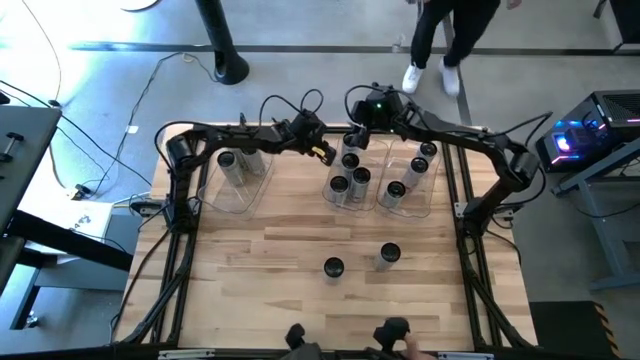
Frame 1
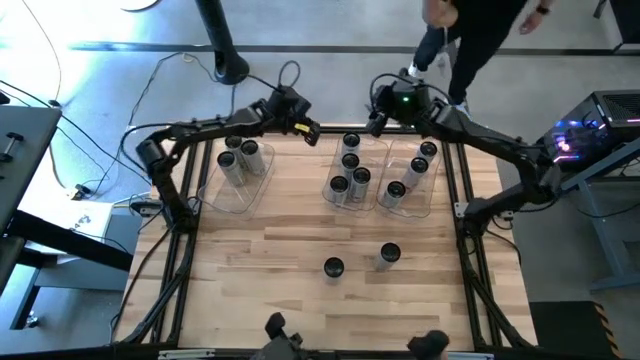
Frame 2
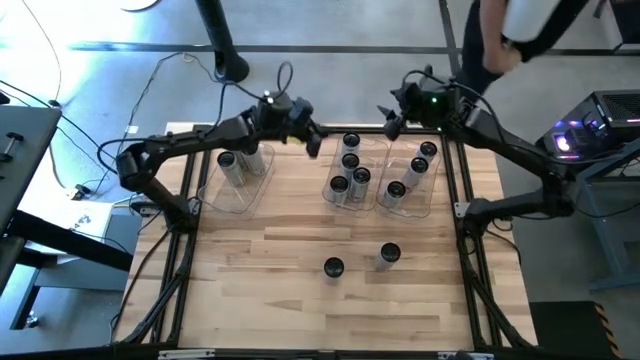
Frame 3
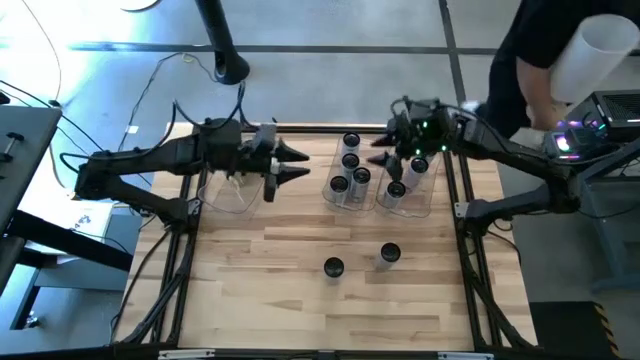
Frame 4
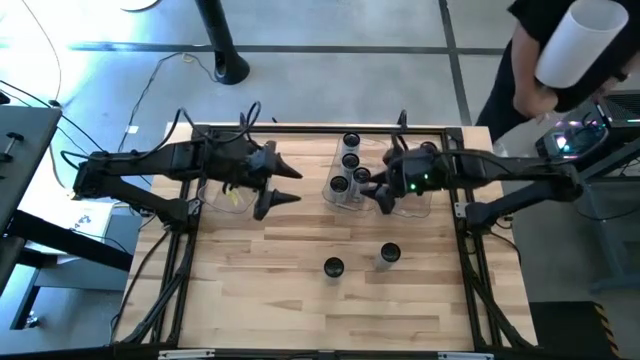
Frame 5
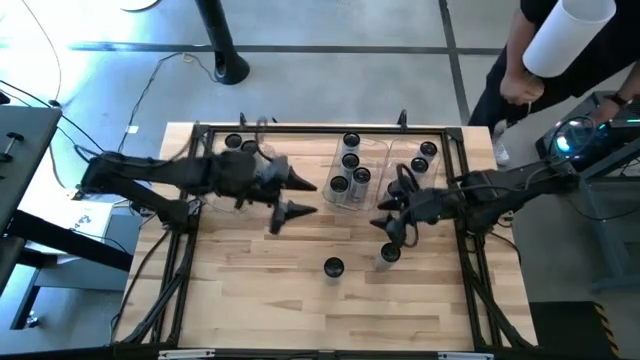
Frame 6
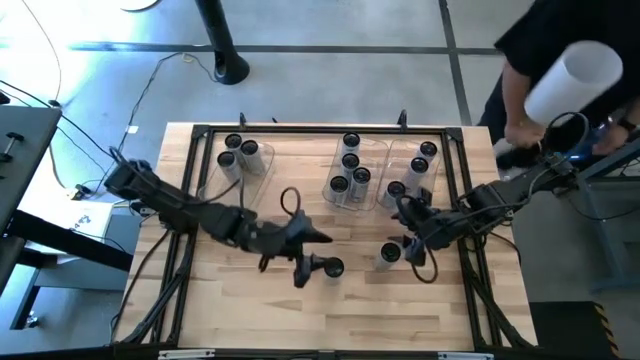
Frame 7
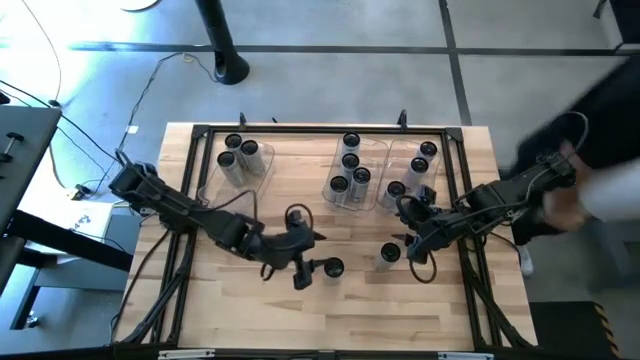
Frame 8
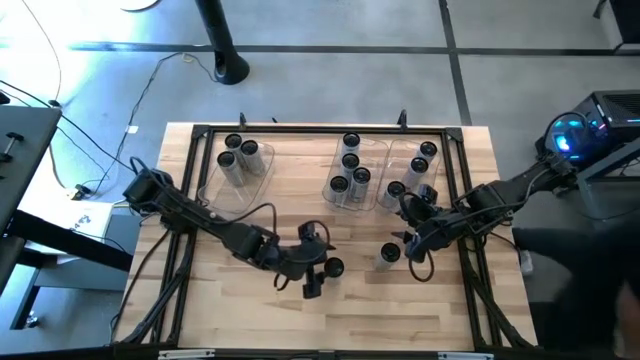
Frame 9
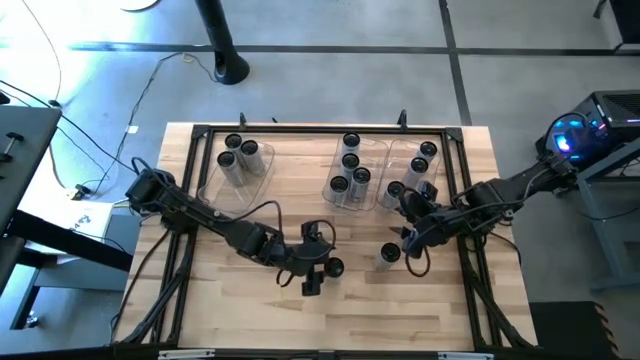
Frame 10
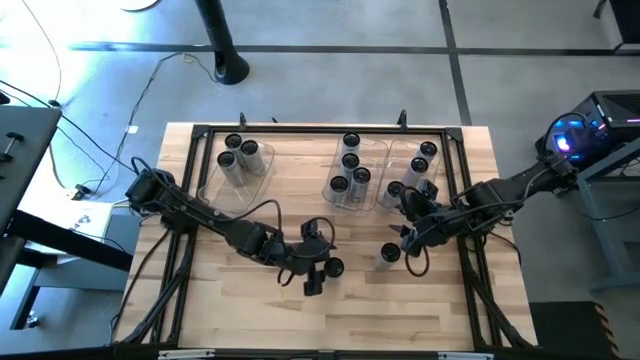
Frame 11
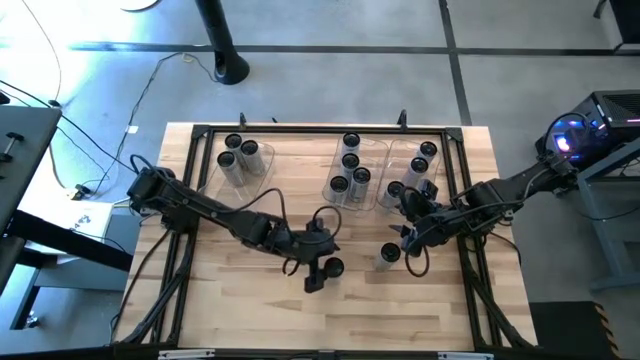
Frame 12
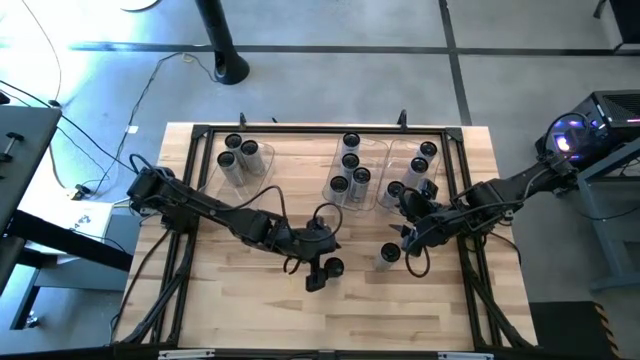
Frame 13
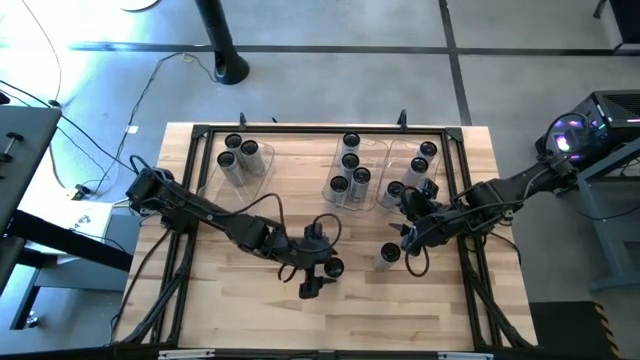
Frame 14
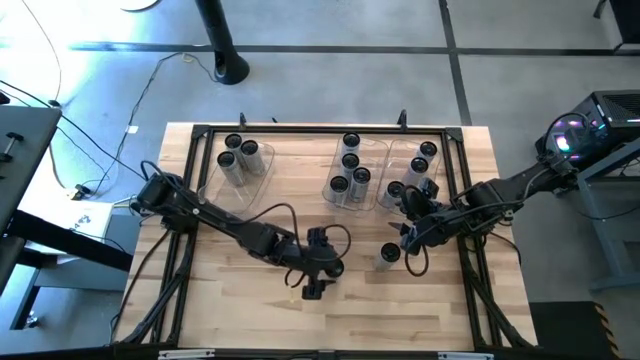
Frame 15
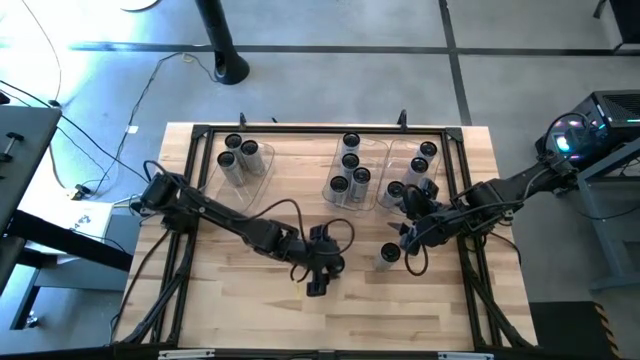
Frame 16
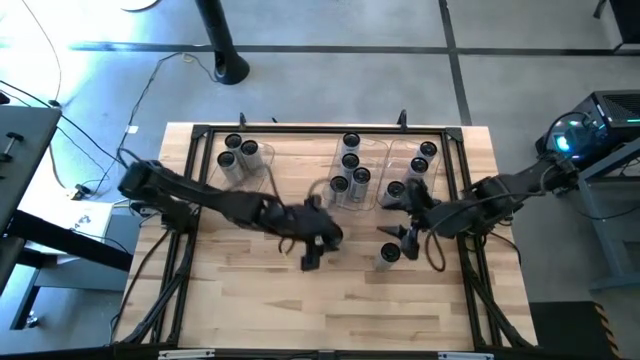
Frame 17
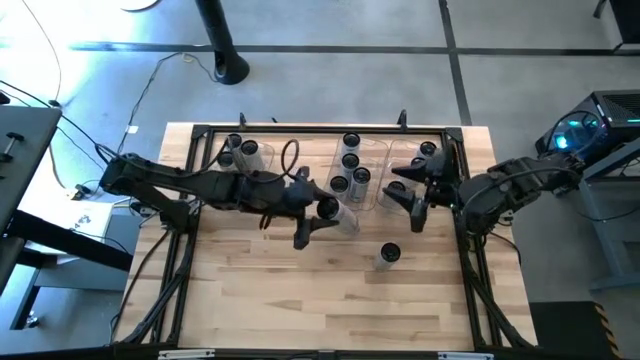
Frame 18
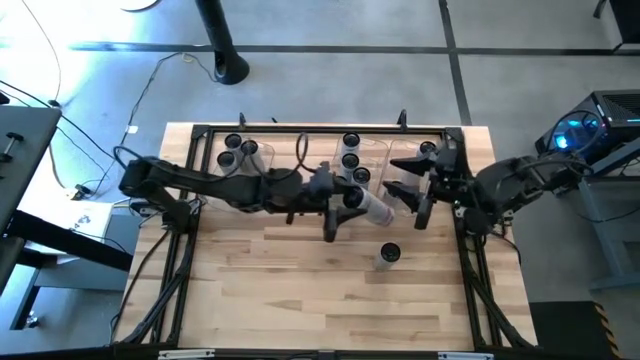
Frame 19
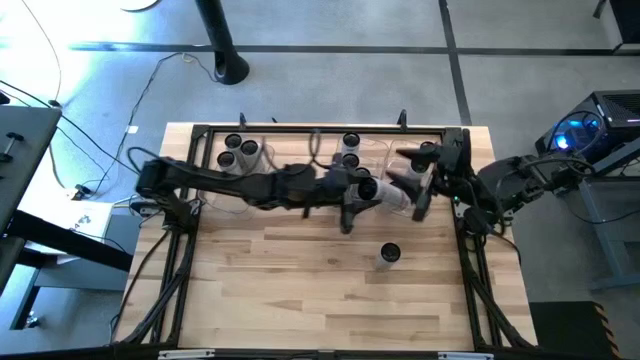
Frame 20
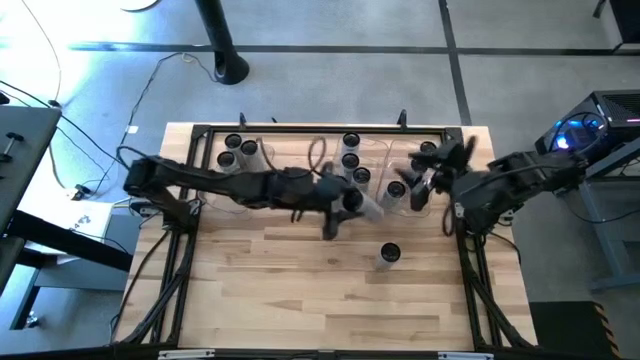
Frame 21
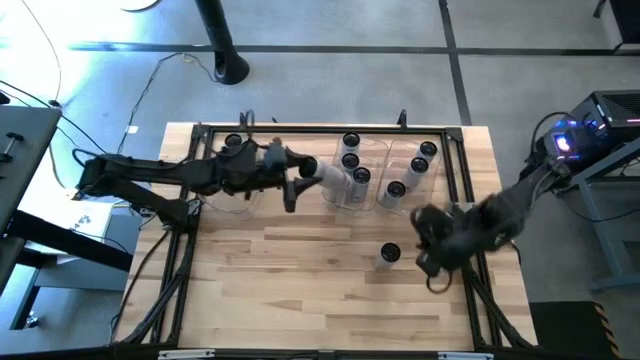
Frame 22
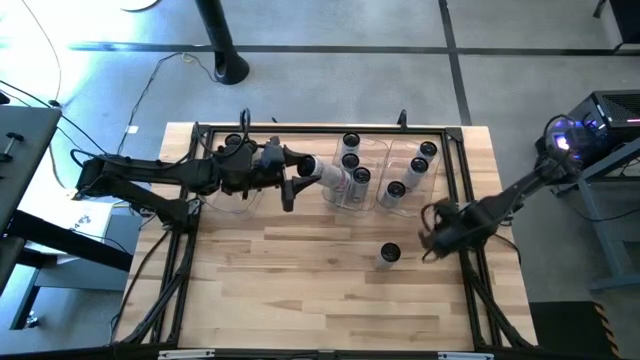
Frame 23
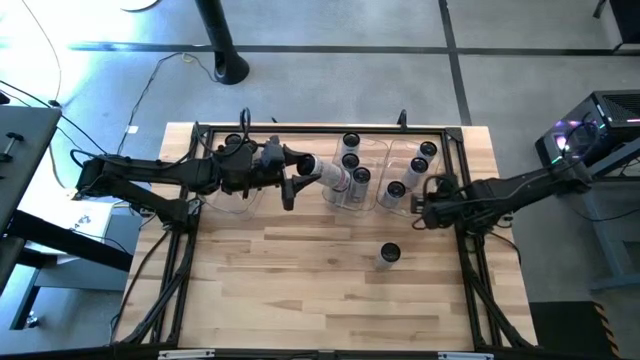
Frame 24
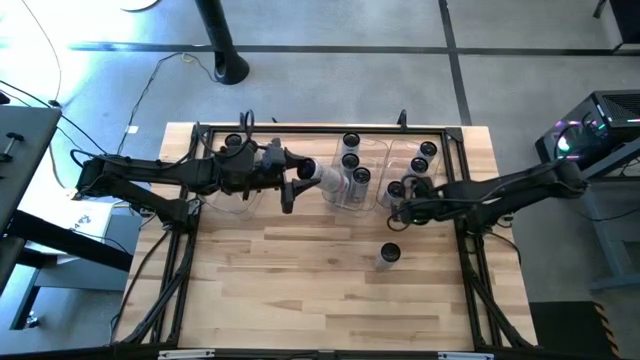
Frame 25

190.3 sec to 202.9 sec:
Task: Sort soda cans
Put the white-pink soda can into the top right transparent bin

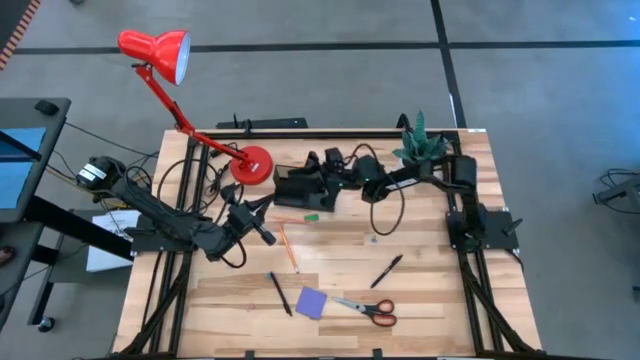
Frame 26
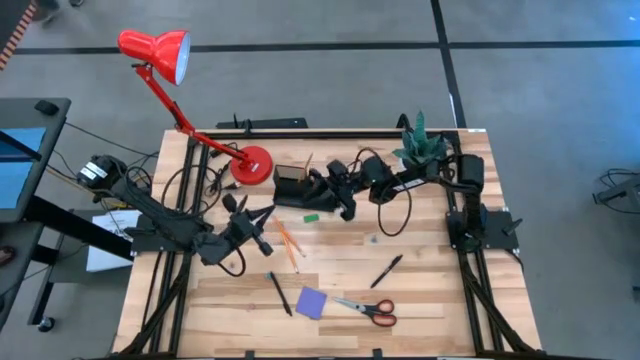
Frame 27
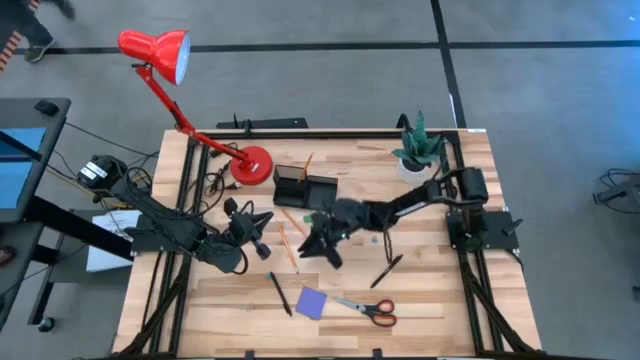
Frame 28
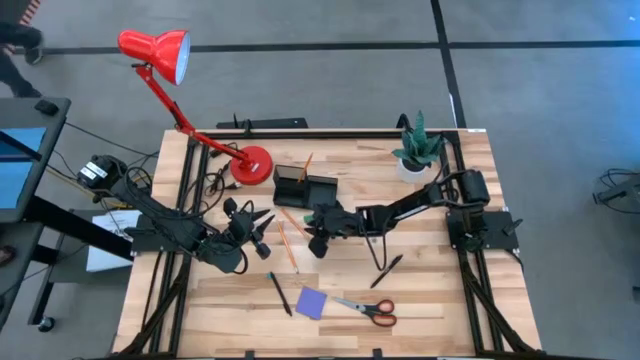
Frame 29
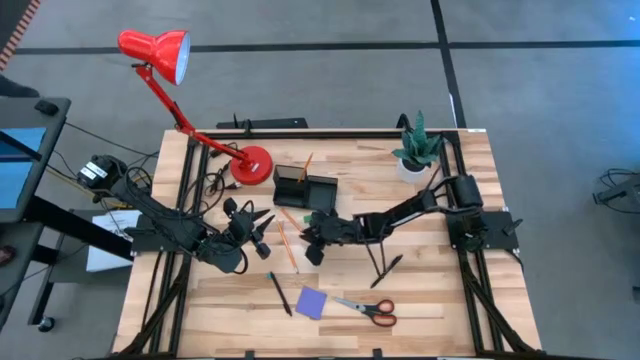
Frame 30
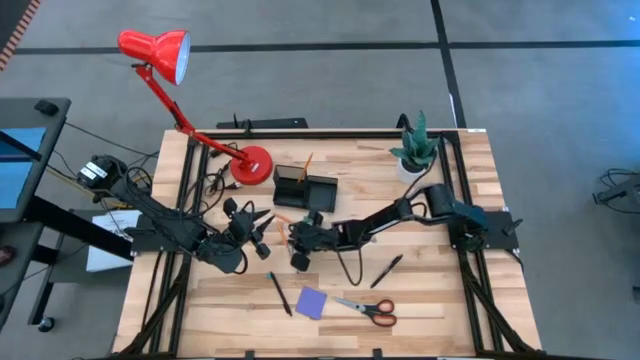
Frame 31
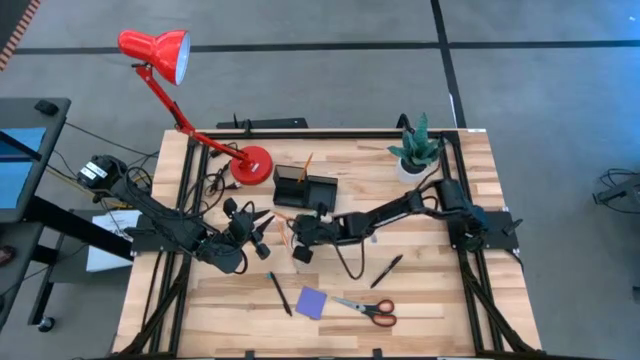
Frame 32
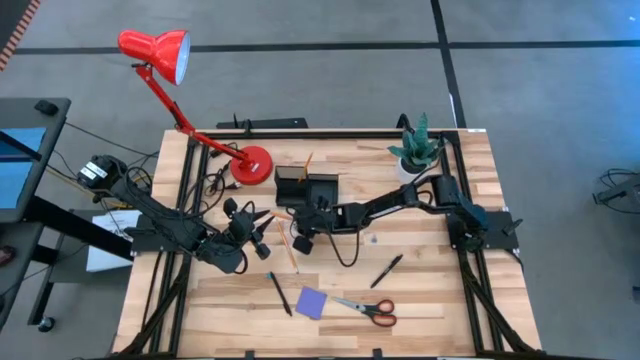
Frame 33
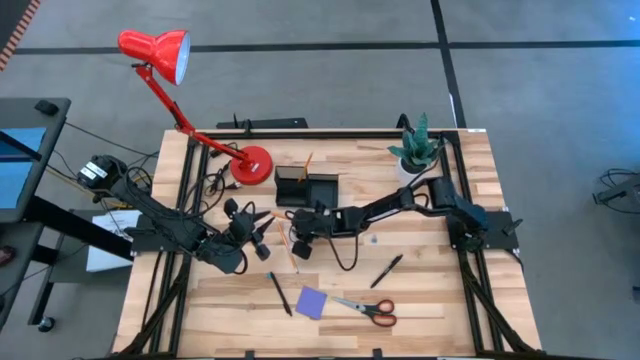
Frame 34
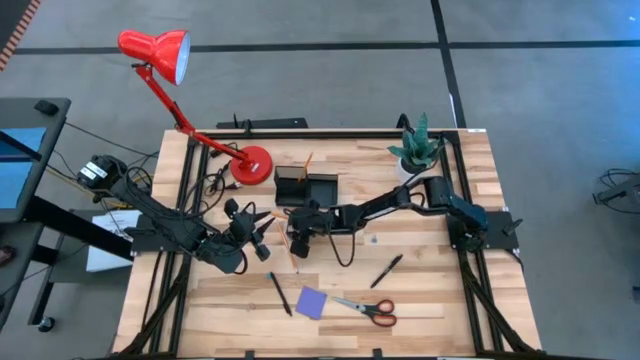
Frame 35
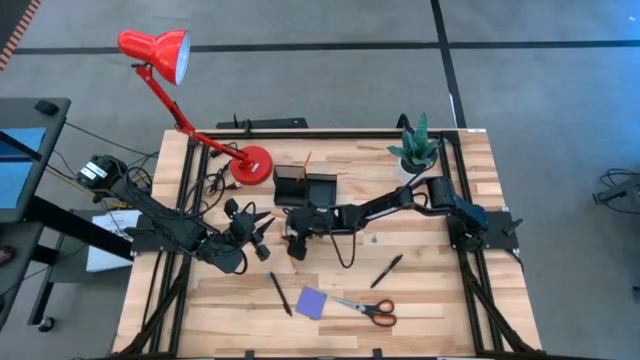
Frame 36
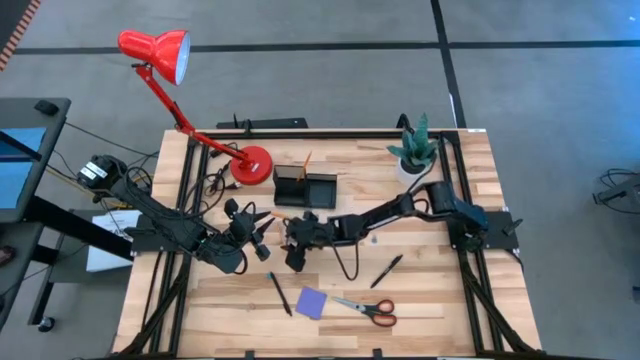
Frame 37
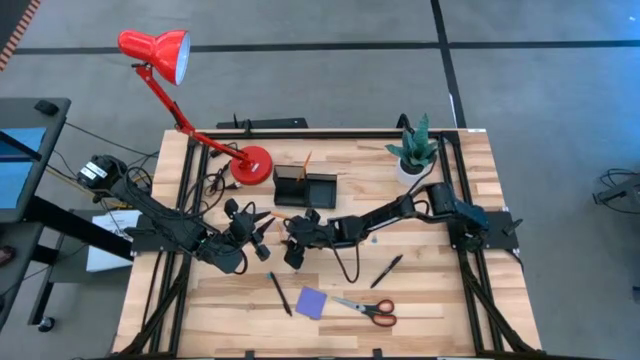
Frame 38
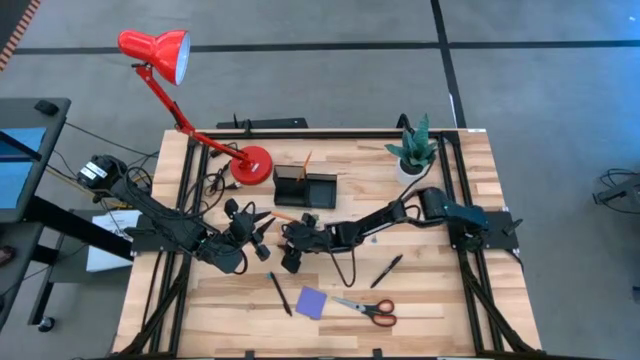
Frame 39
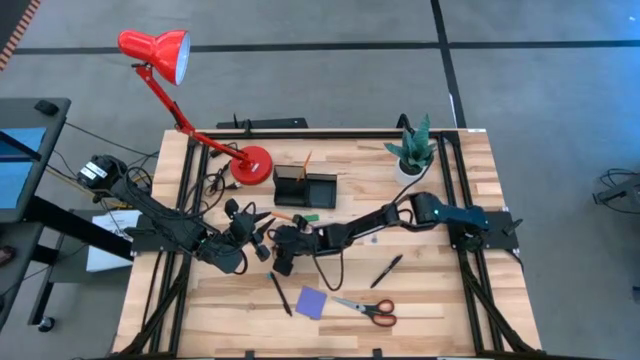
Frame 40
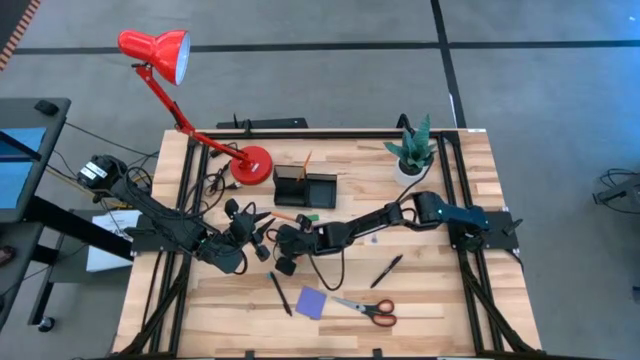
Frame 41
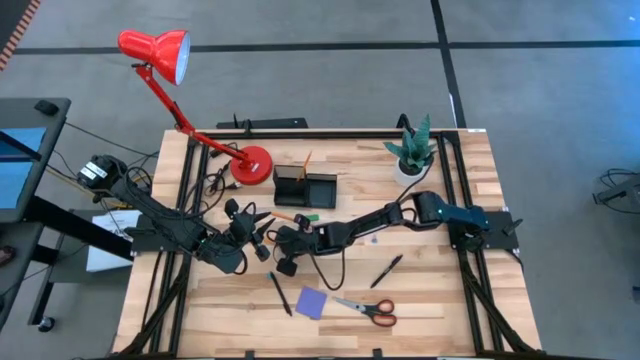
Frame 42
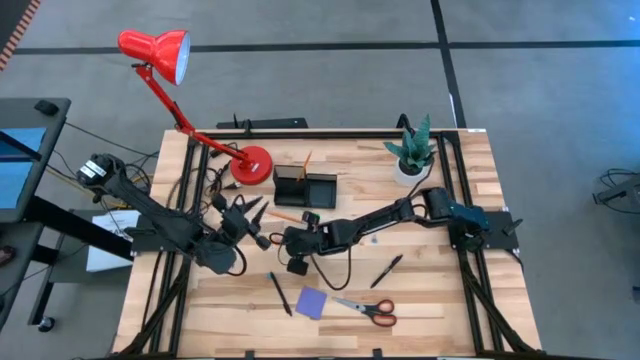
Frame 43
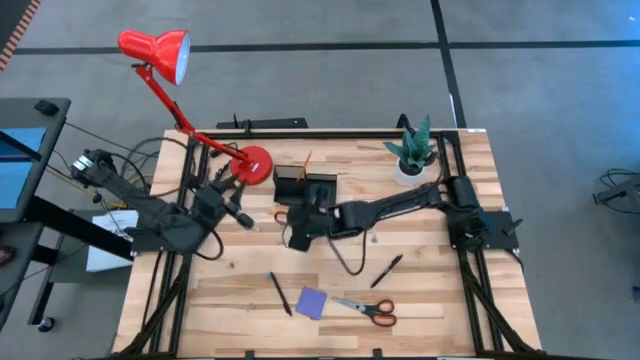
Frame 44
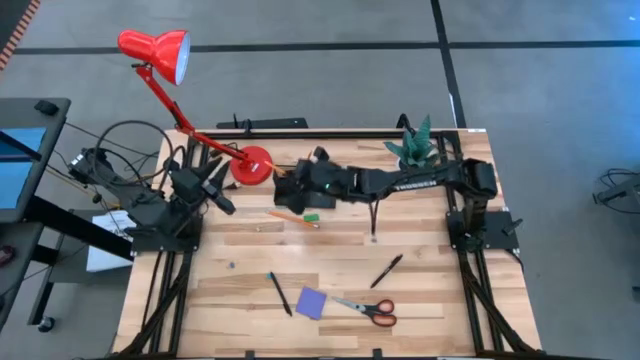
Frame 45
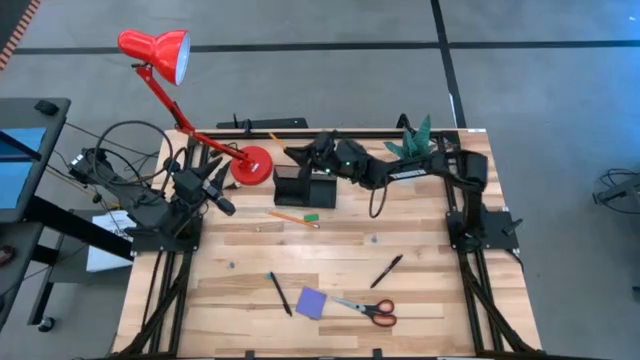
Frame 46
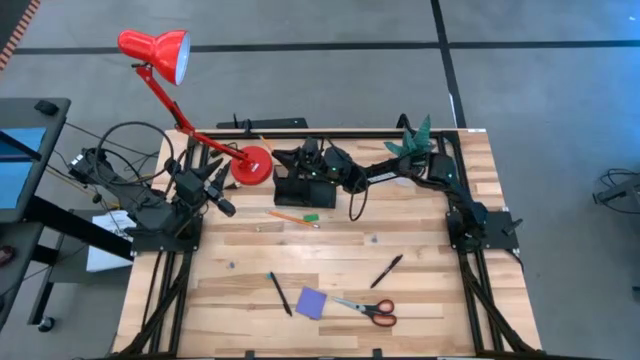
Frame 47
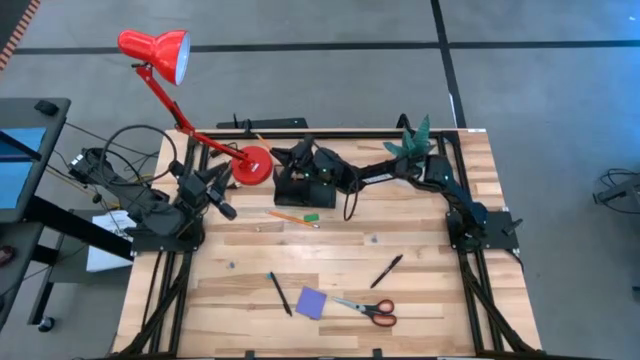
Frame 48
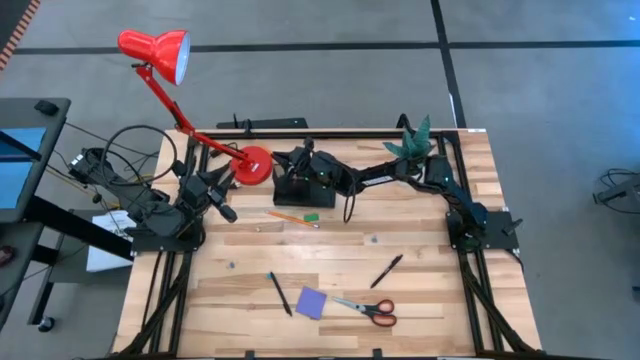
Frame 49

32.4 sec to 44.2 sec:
Task: Pick and place office supplies into organizer
Put the bottom yellow pencil into the black desk organizer
